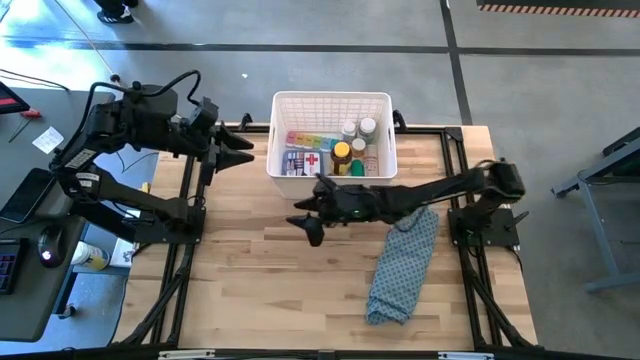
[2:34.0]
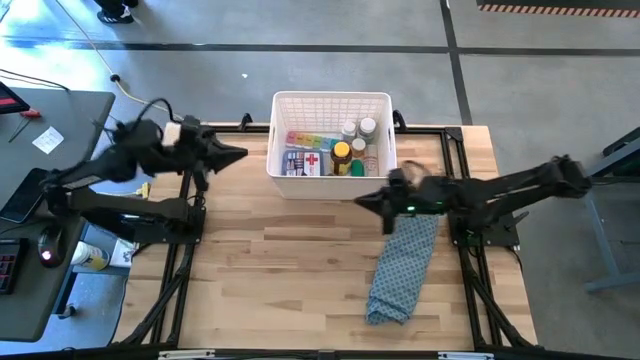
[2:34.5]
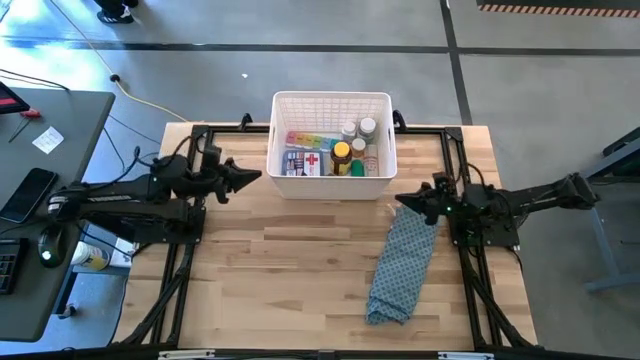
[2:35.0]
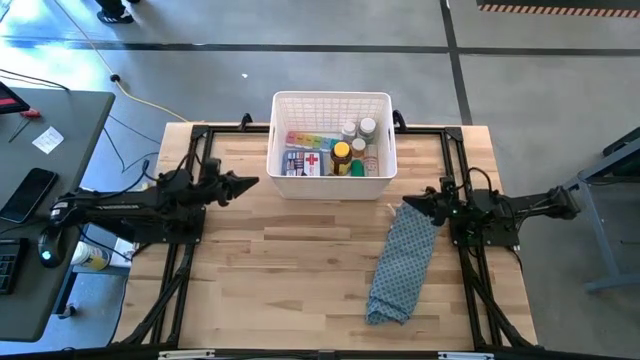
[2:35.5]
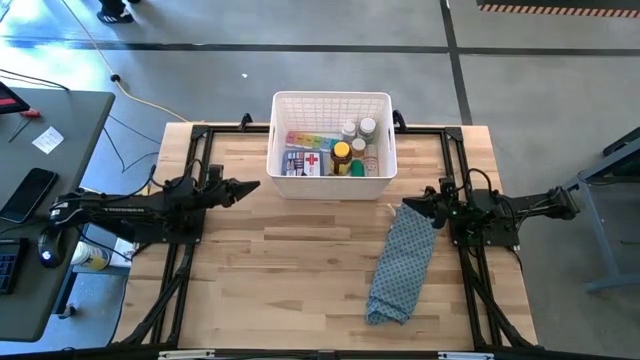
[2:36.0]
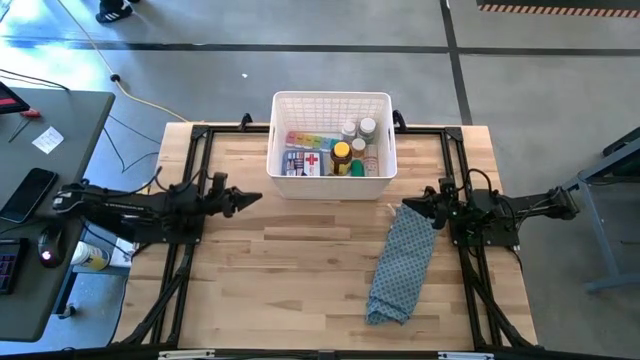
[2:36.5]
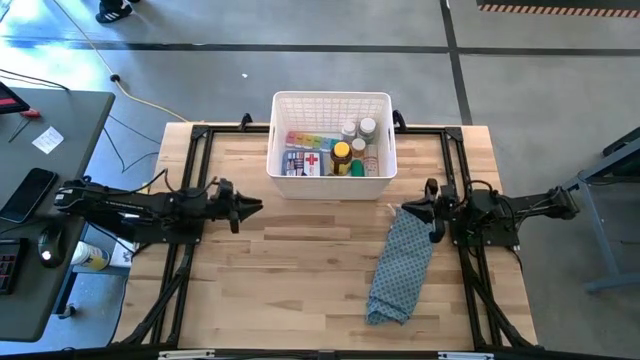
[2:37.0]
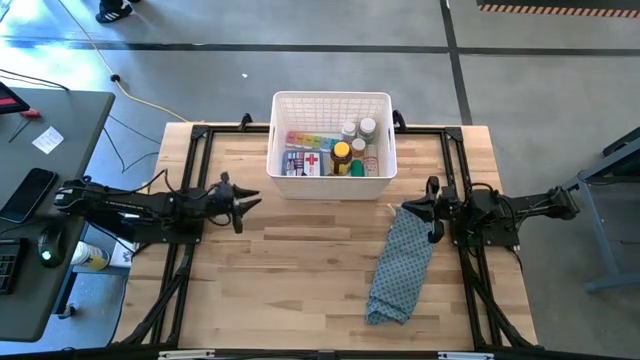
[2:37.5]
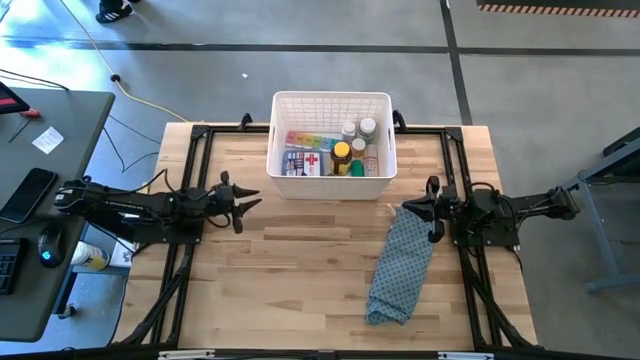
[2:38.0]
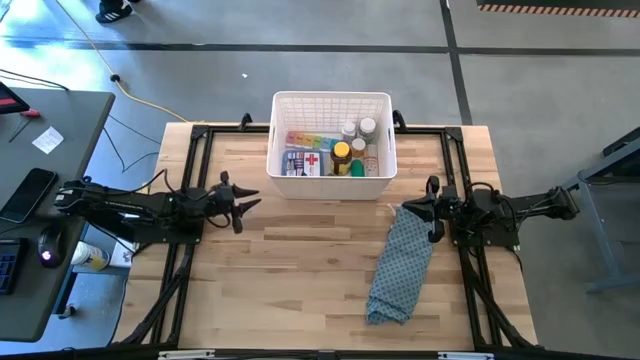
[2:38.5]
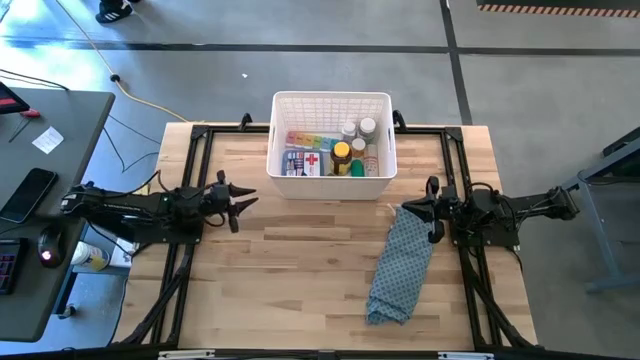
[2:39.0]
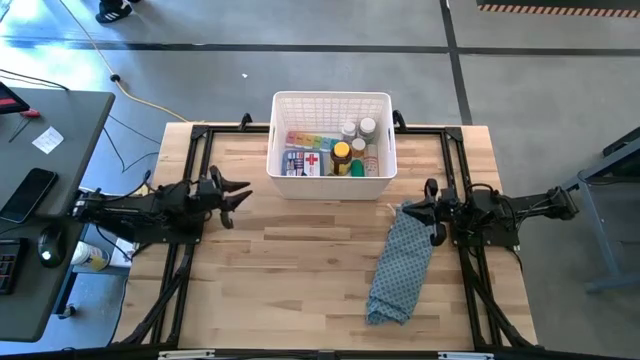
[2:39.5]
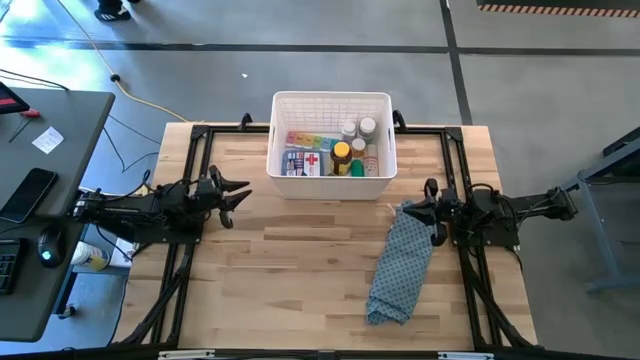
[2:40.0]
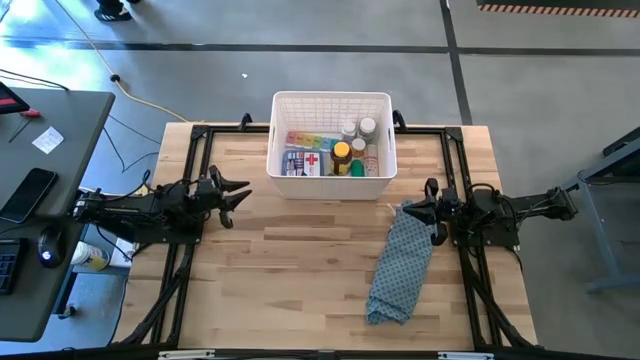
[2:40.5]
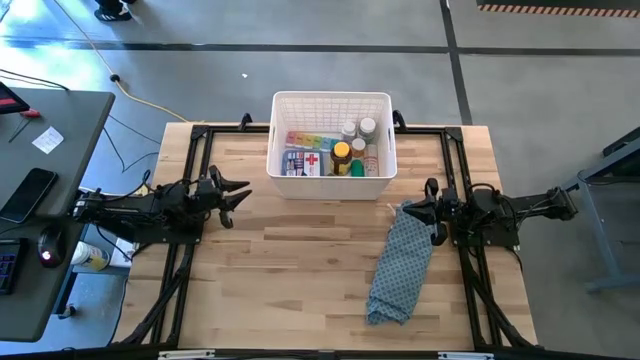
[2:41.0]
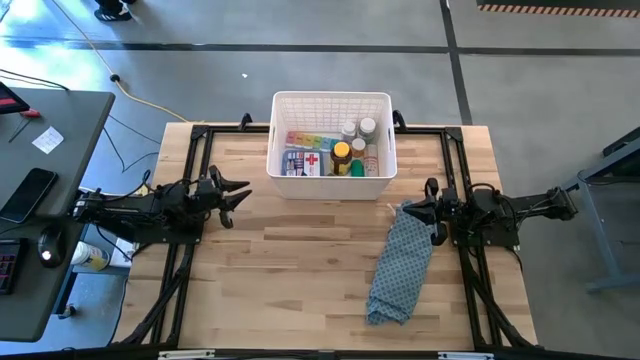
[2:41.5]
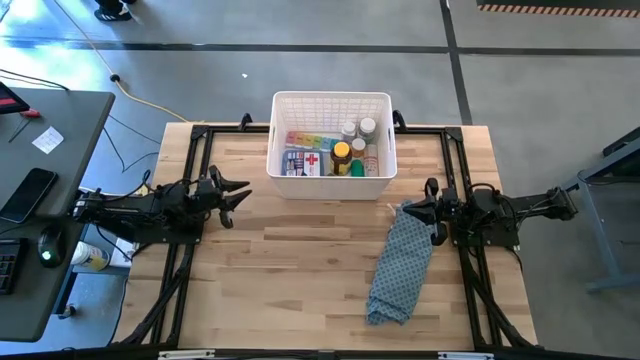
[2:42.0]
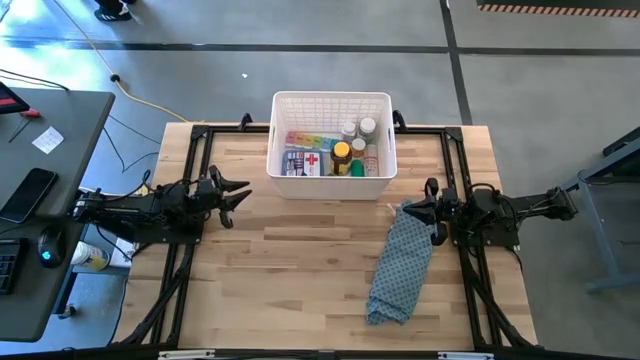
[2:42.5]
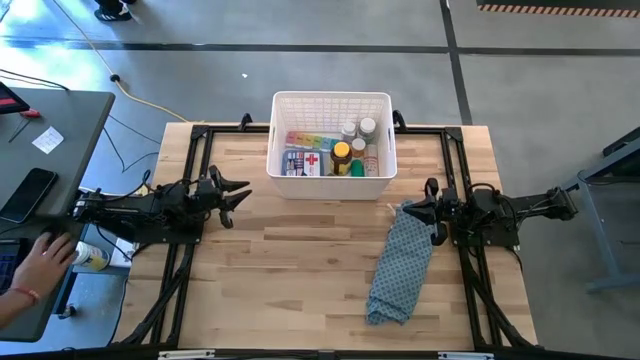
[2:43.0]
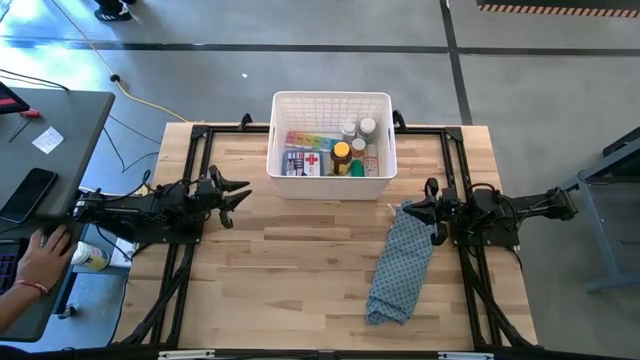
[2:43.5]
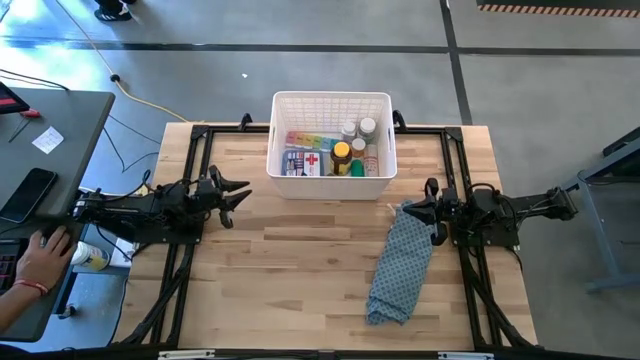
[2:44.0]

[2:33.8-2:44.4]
Task: Pick & place medical supplies in basket/bin
Return to Home Position

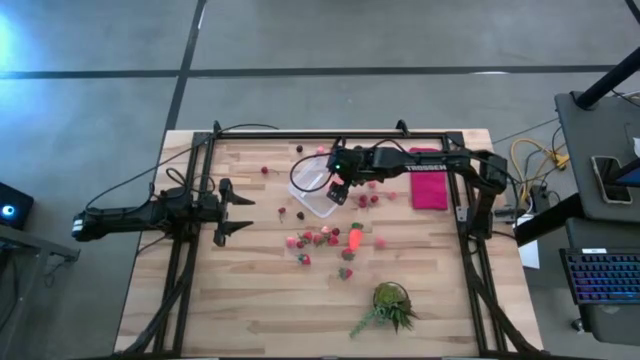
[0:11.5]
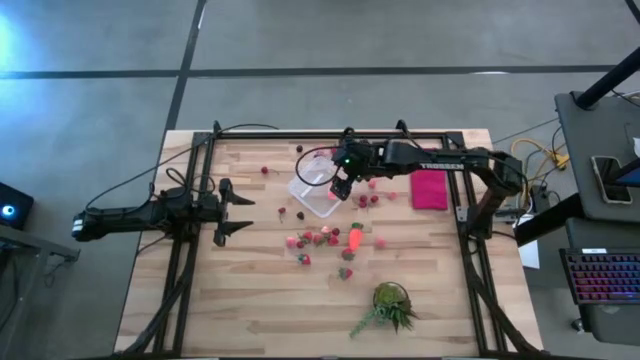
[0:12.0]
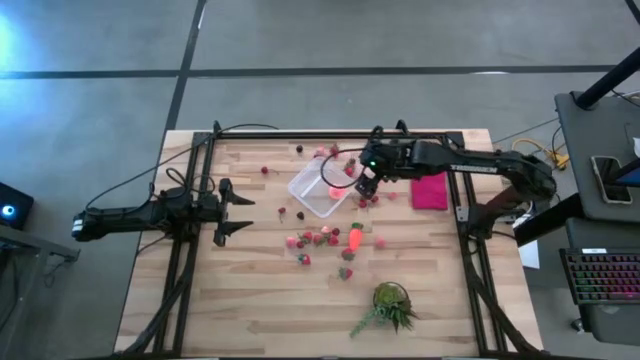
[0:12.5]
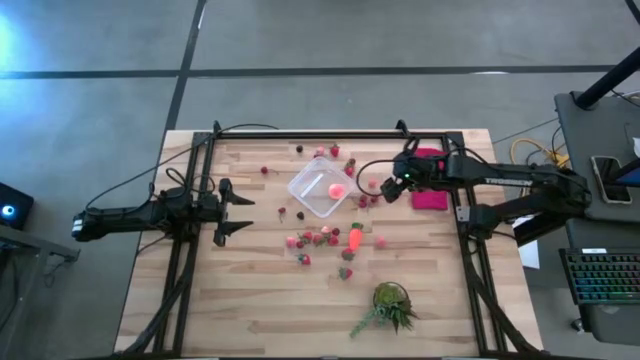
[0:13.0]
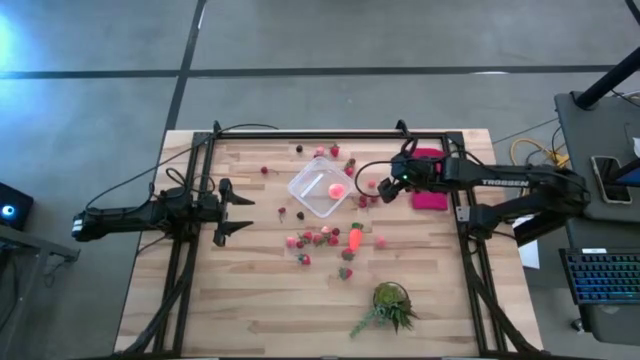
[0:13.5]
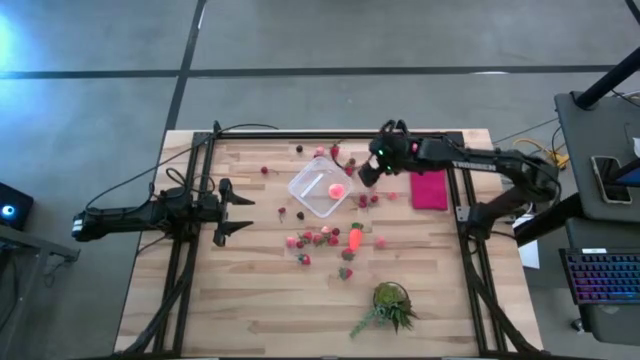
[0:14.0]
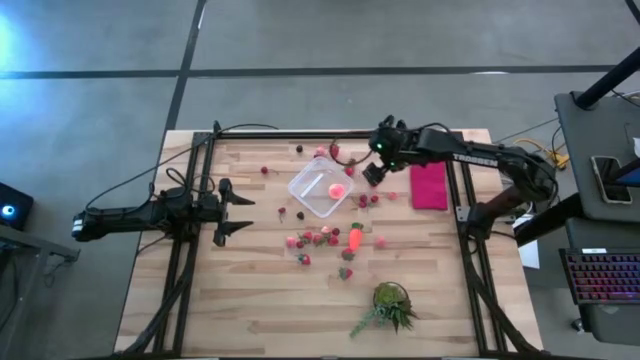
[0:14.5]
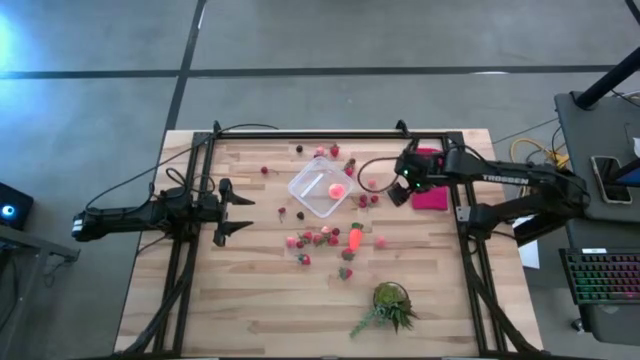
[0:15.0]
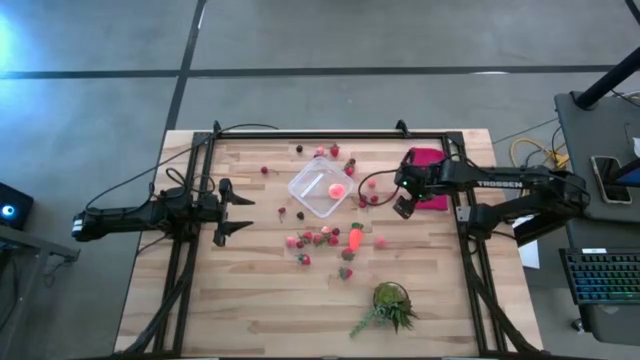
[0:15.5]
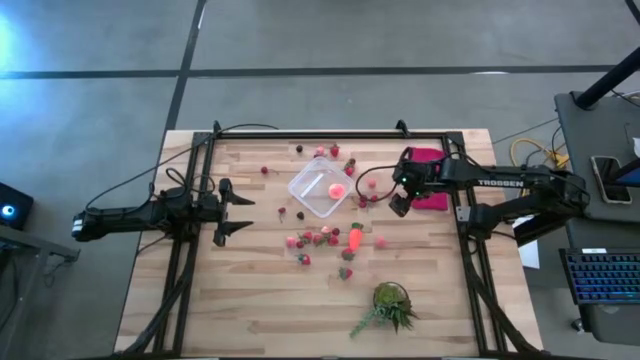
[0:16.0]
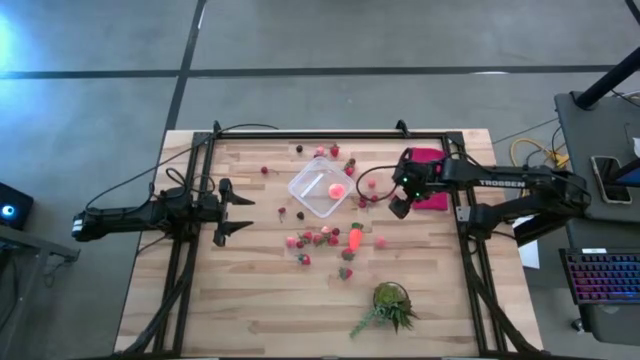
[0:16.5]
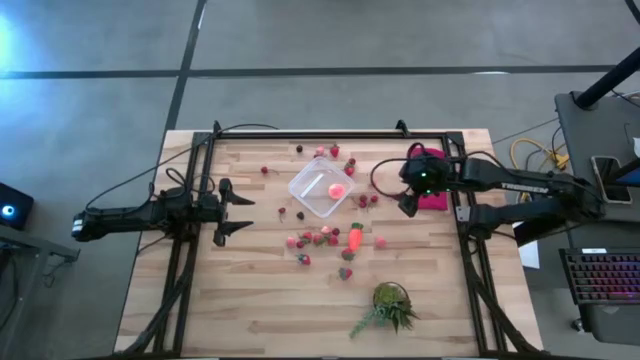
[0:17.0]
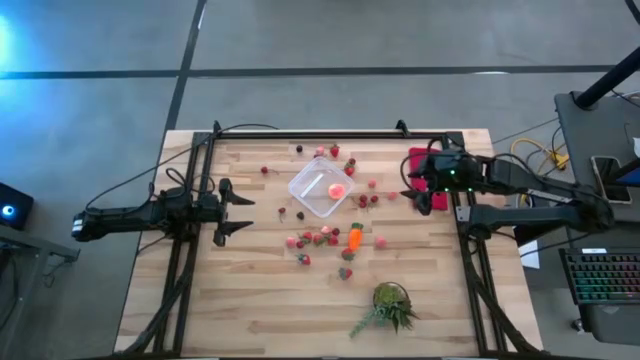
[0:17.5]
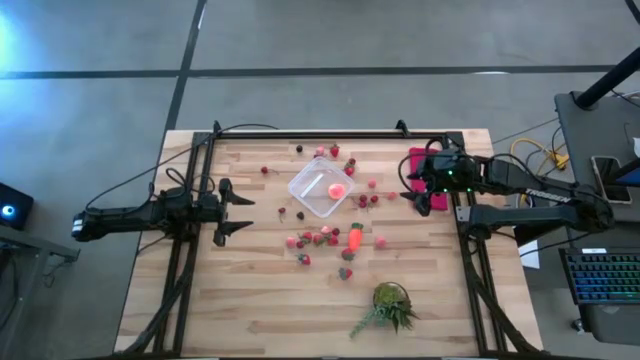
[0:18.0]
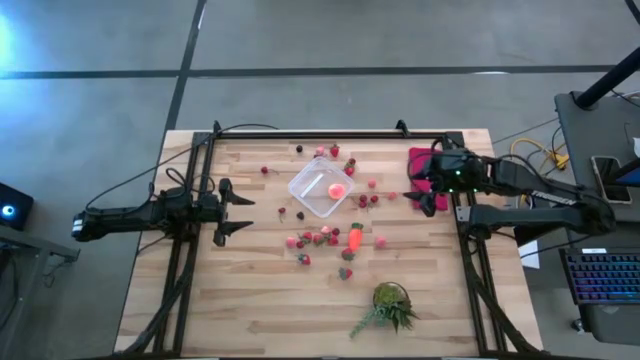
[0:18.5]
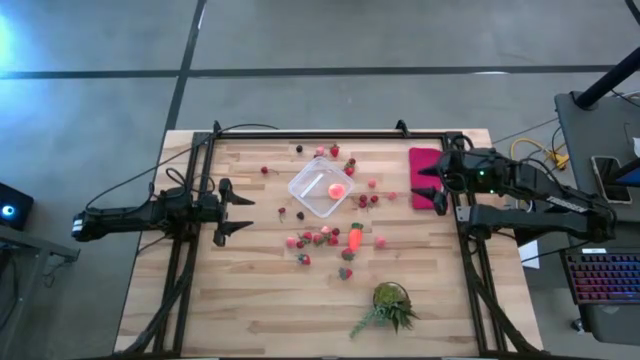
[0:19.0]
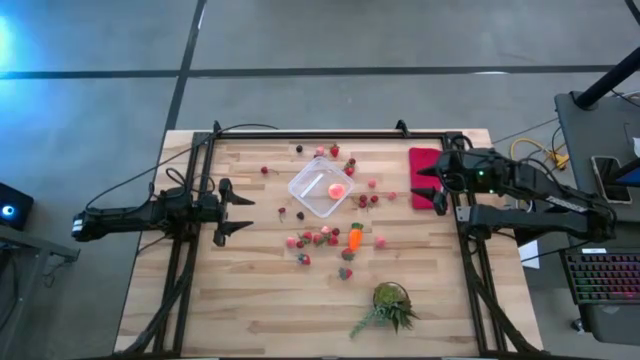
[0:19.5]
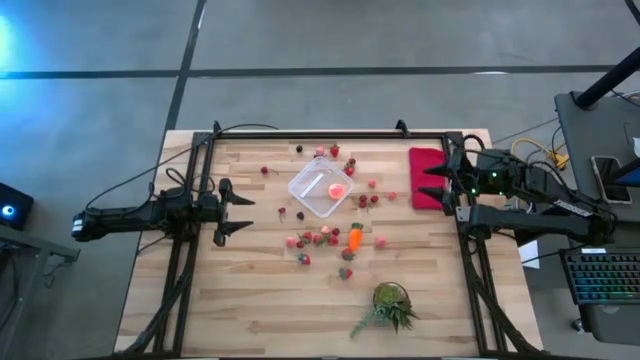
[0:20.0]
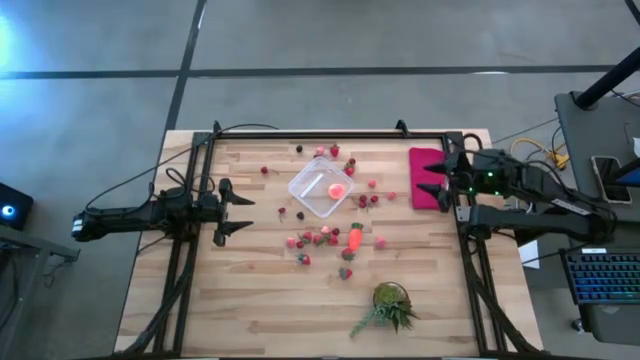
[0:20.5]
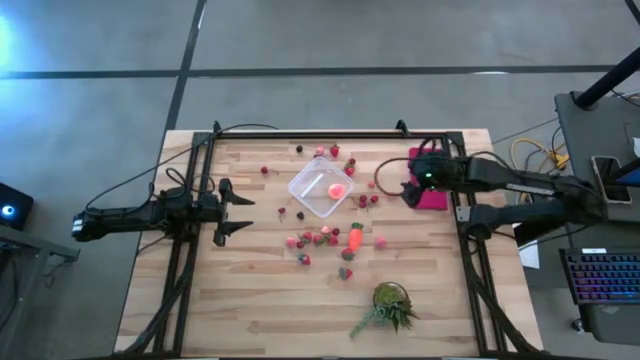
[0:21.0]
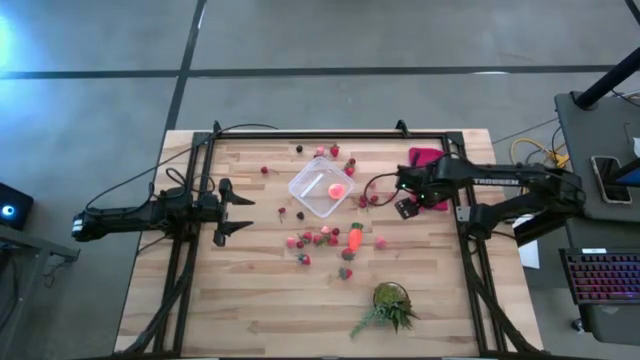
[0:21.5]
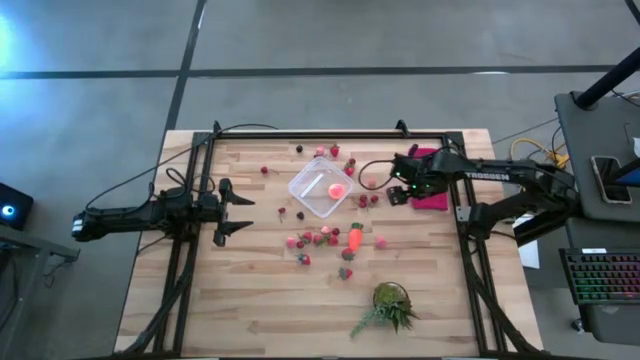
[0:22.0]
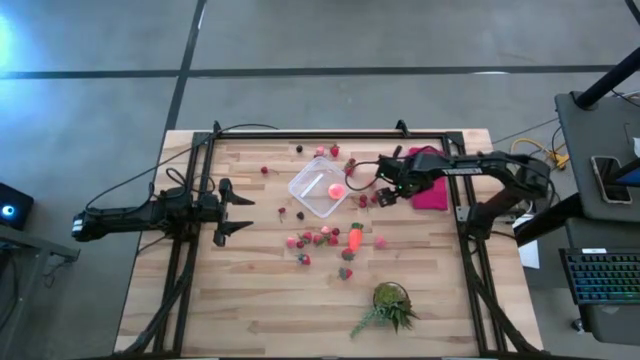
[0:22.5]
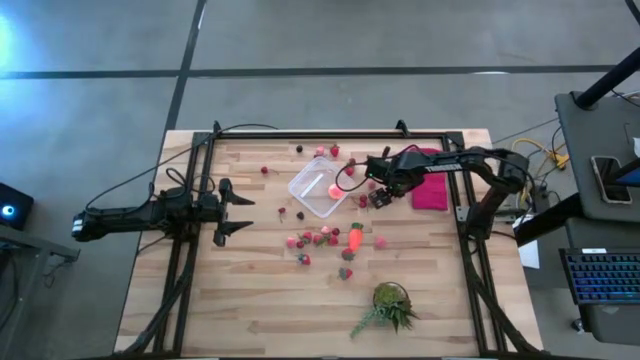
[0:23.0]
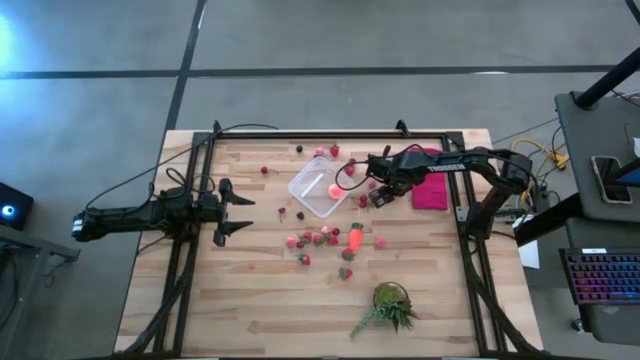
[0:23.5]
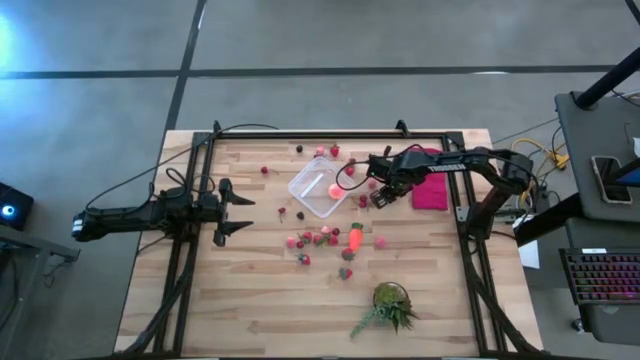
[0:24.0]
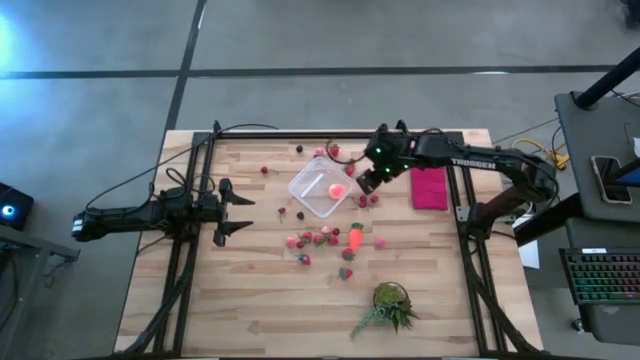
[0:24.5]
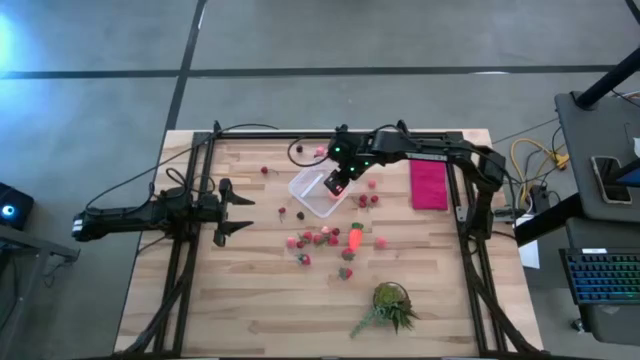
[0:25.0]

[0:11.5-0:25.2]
Task: Pick and placing Produce into tupperware
Put the pink apricot into the transparent container
